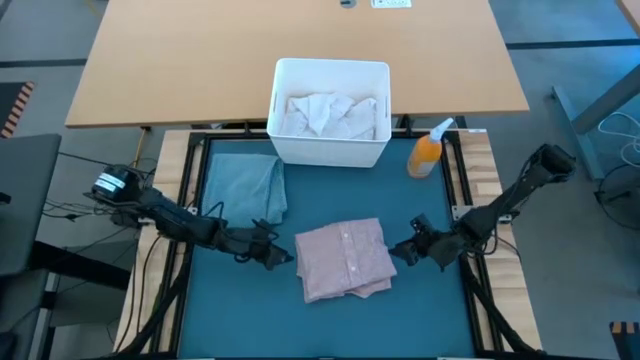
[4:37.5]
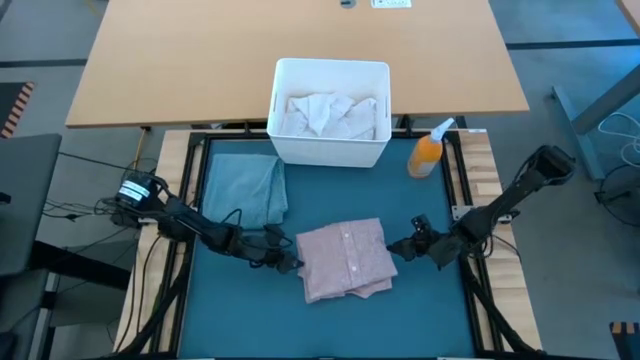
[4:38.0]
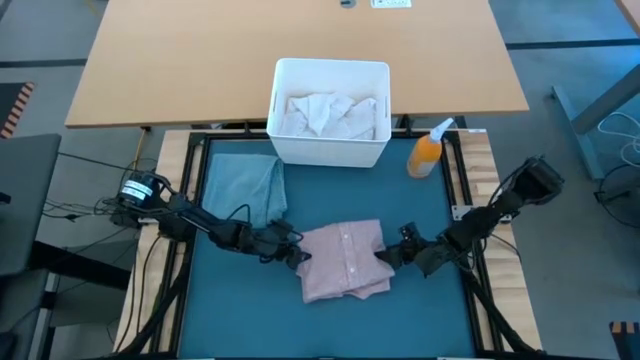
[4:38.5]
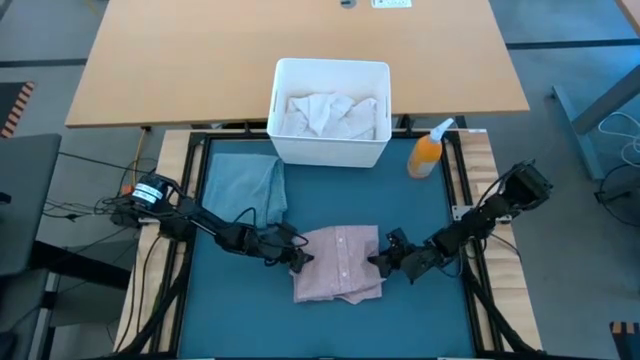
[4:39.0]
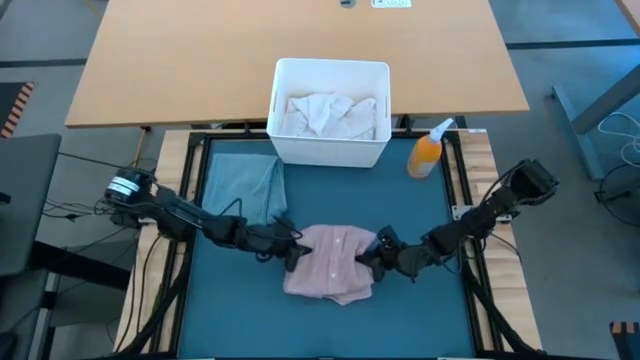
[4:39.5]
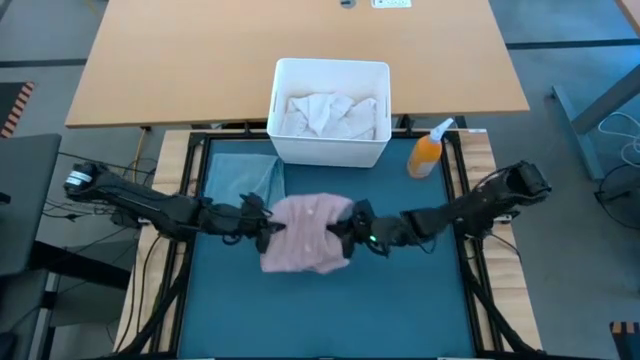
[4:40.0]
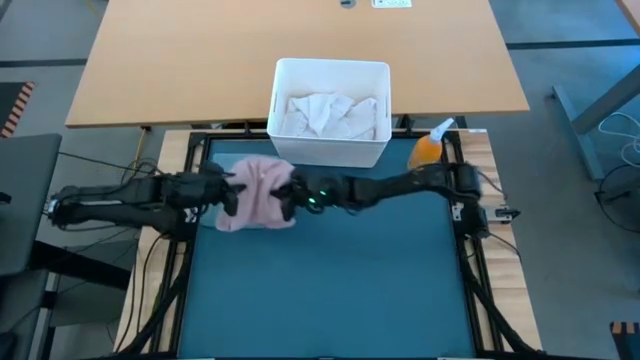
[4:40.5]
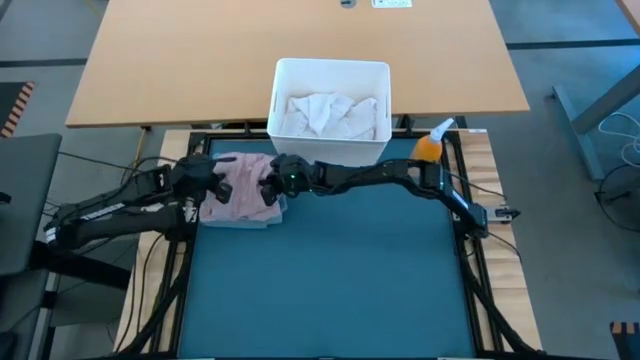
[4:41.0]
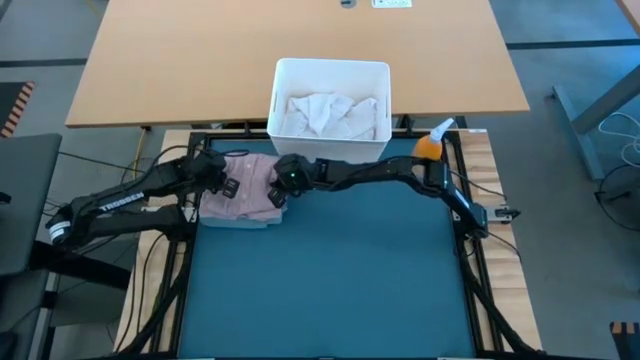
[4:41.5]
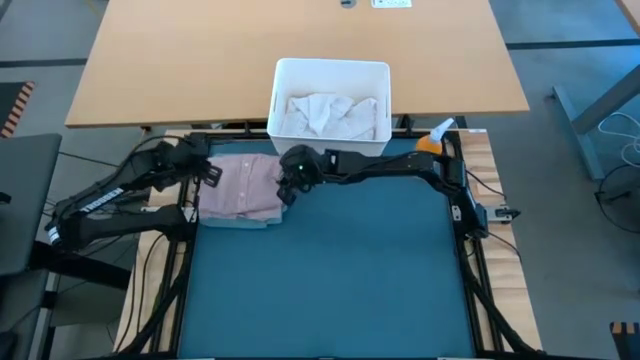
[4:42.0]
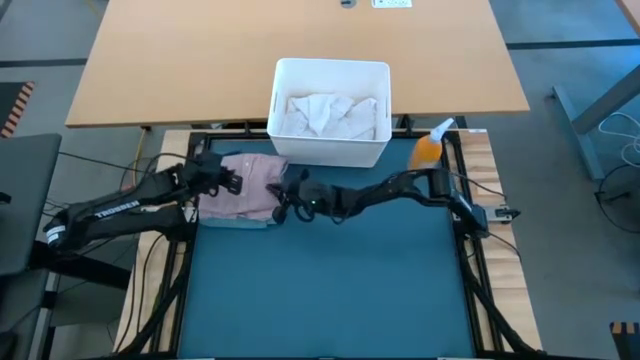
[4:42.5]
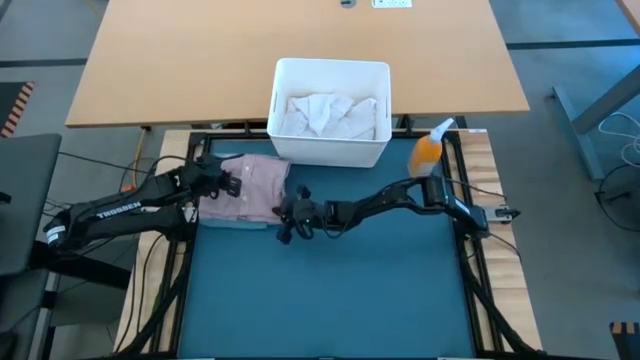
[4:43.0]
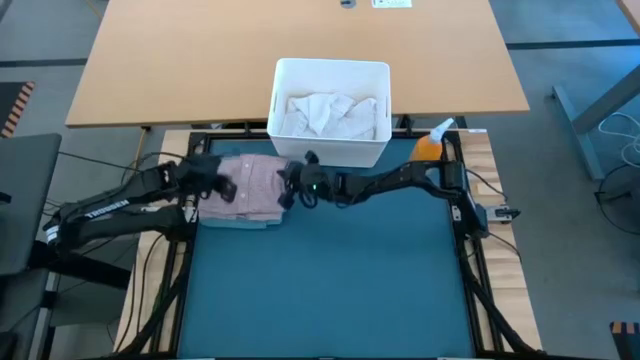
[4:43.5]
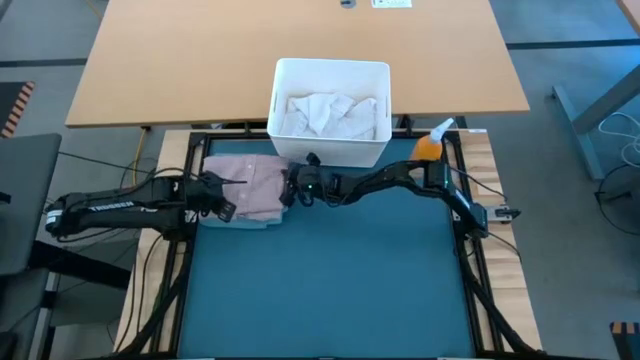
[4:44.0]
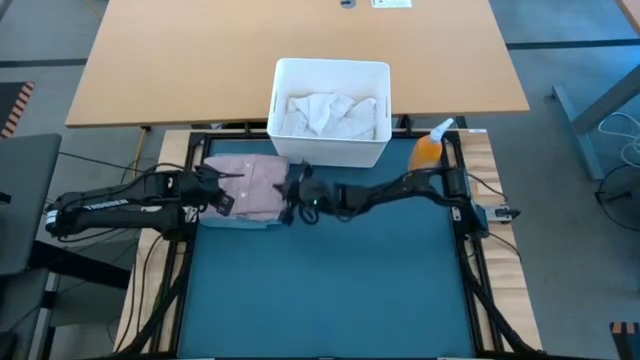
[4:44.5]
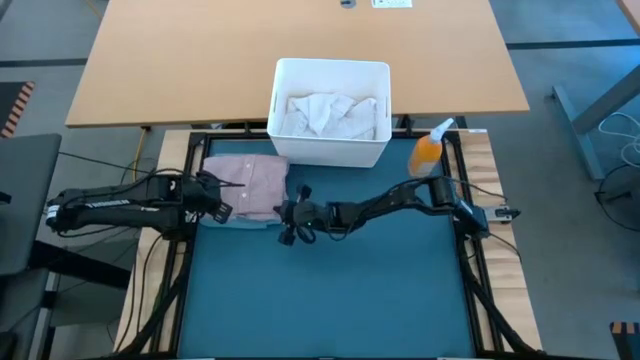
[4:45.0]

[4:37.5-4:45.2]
Task: Fold Laundry from Bin
Stack the pink shirt on top of the blue pants

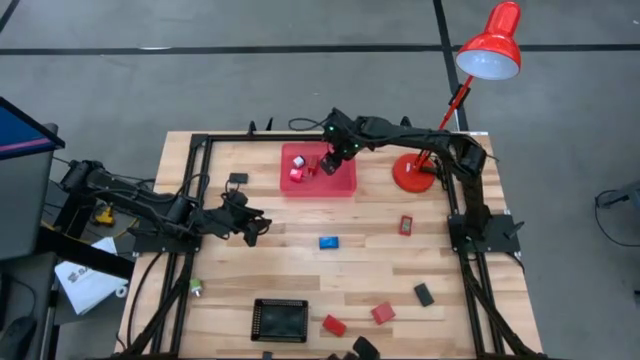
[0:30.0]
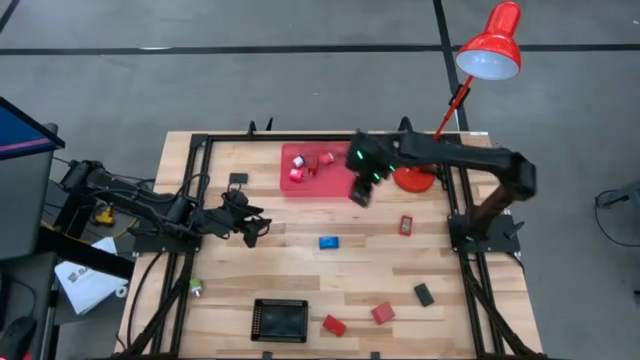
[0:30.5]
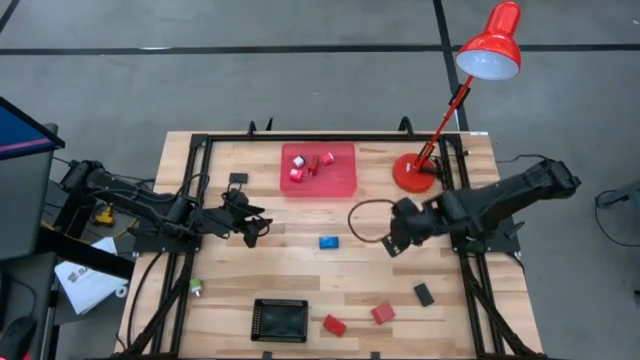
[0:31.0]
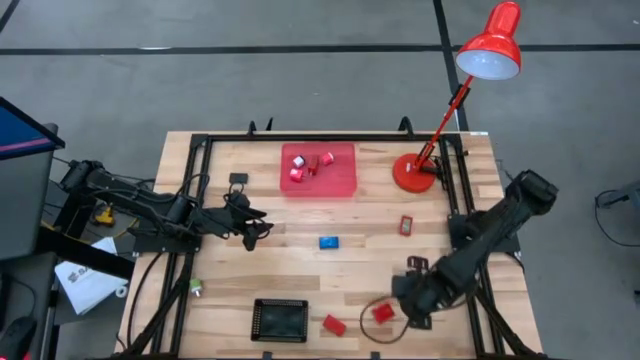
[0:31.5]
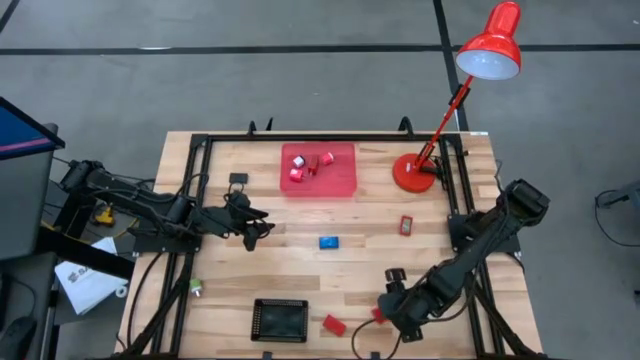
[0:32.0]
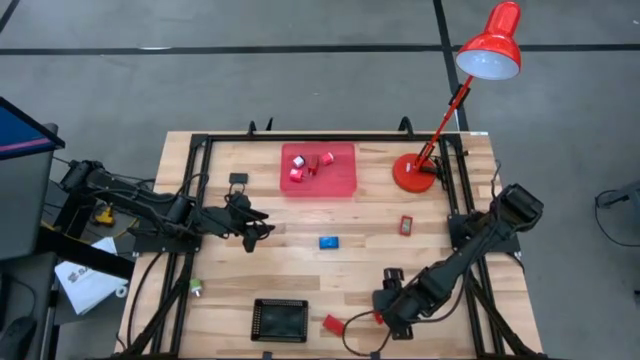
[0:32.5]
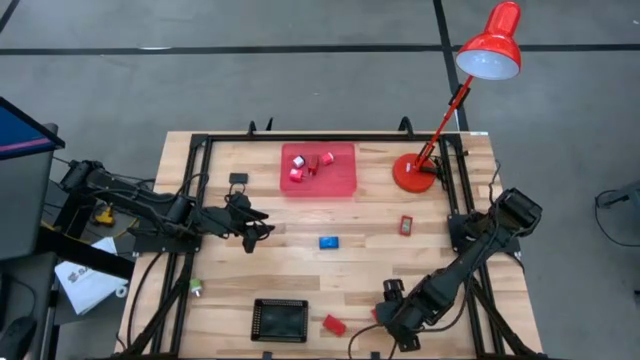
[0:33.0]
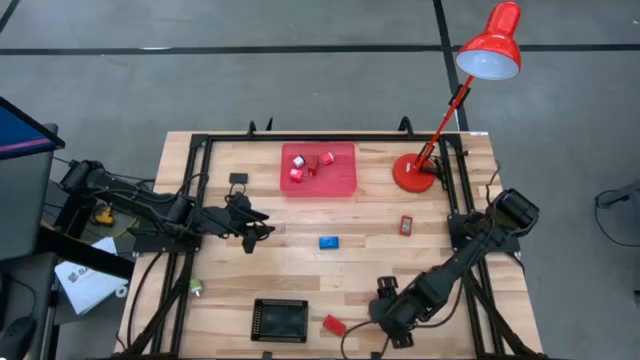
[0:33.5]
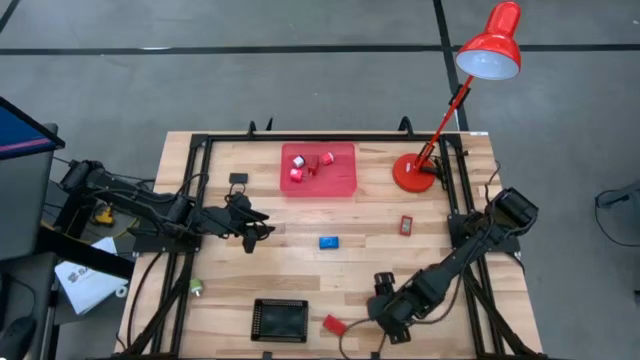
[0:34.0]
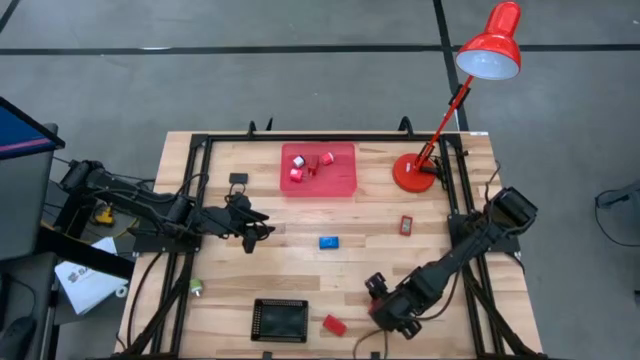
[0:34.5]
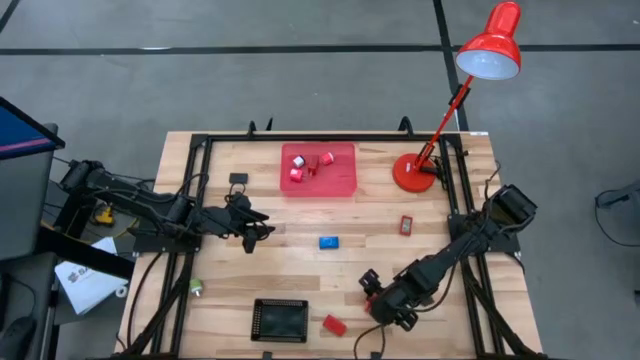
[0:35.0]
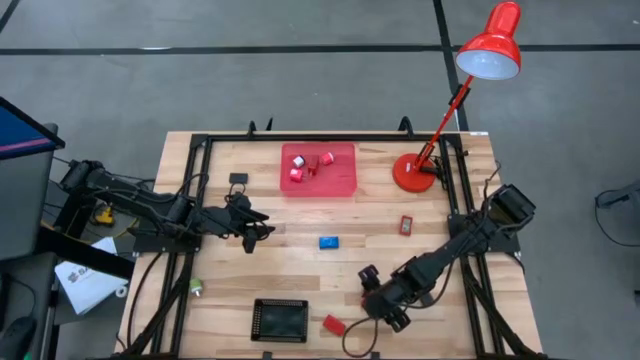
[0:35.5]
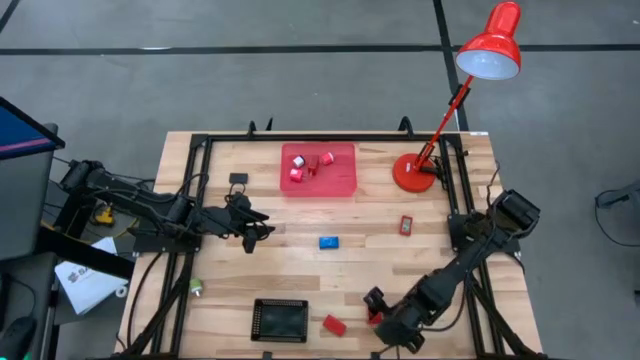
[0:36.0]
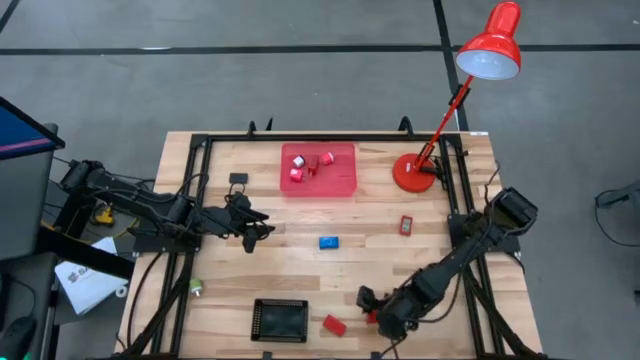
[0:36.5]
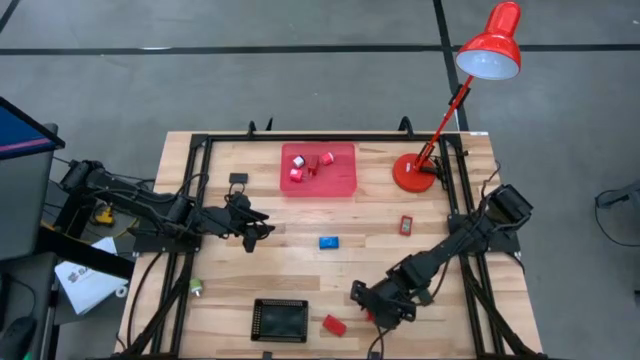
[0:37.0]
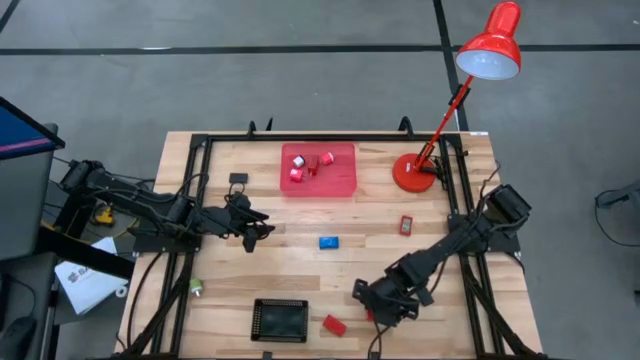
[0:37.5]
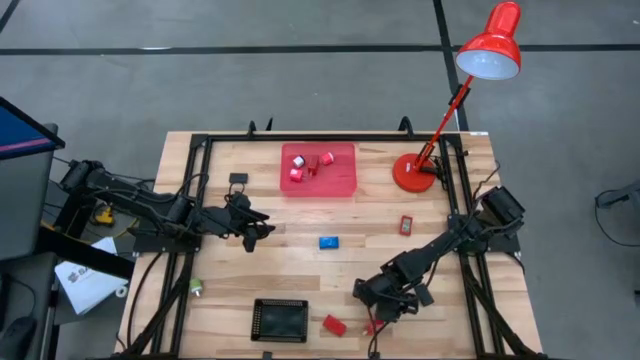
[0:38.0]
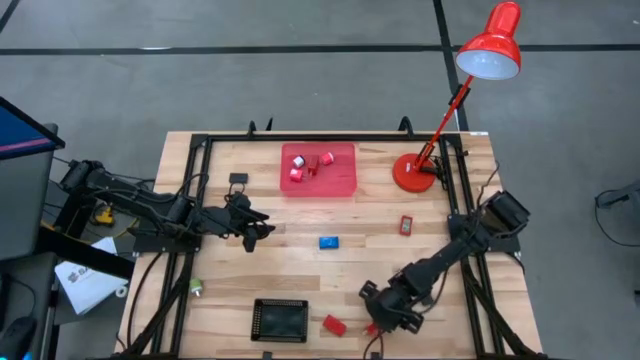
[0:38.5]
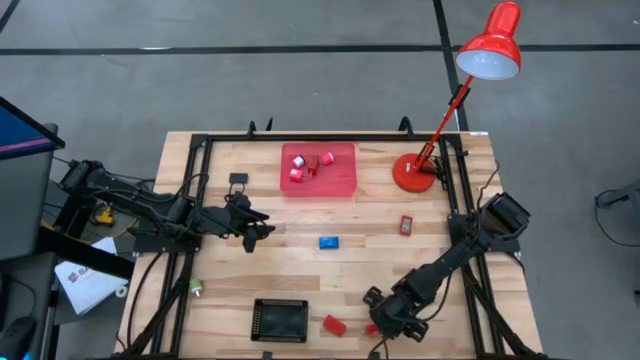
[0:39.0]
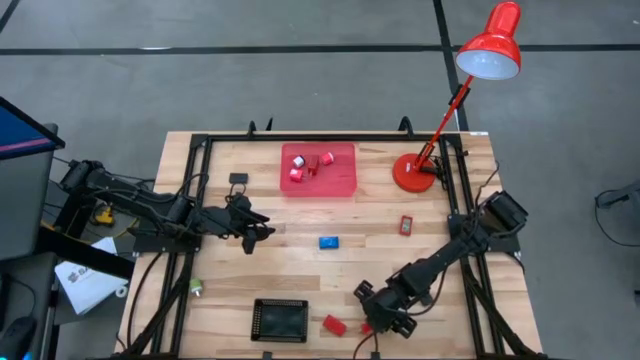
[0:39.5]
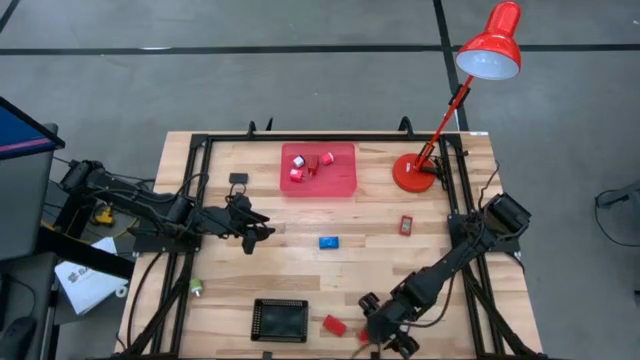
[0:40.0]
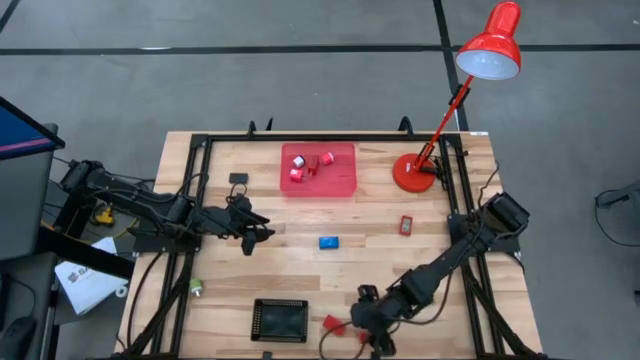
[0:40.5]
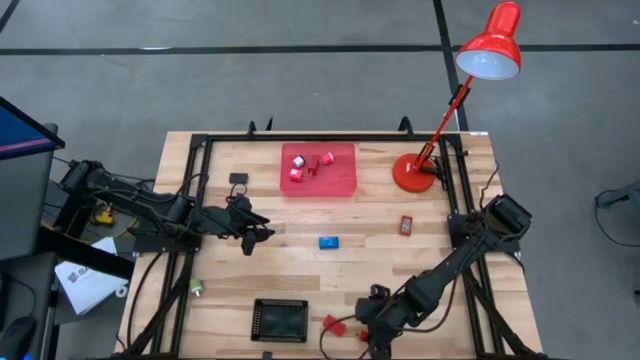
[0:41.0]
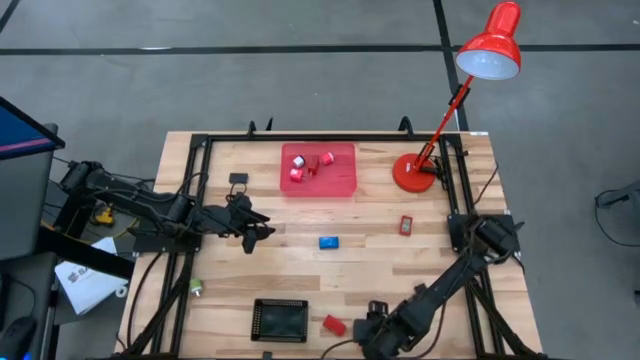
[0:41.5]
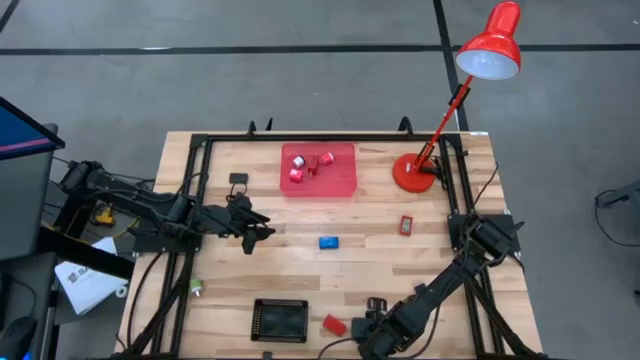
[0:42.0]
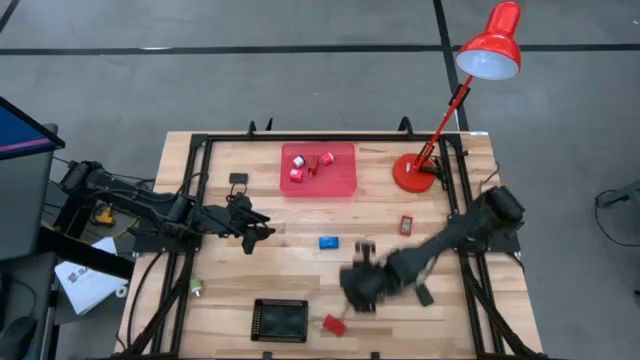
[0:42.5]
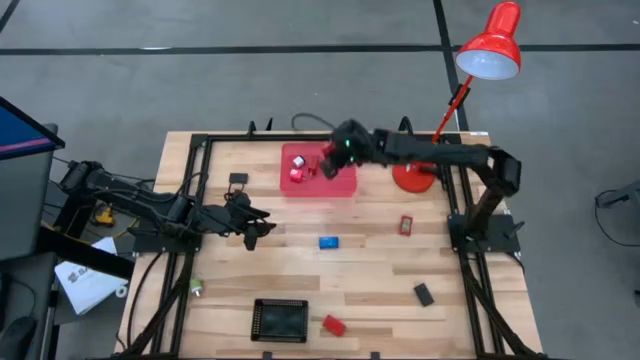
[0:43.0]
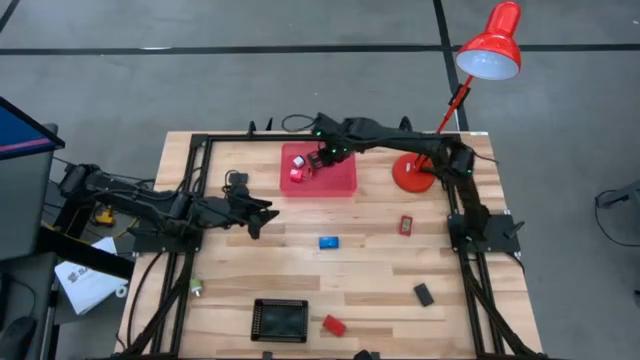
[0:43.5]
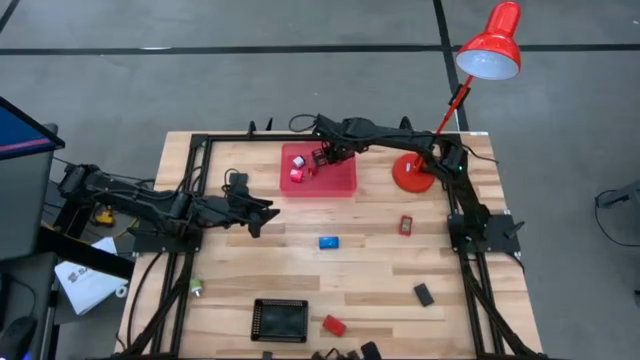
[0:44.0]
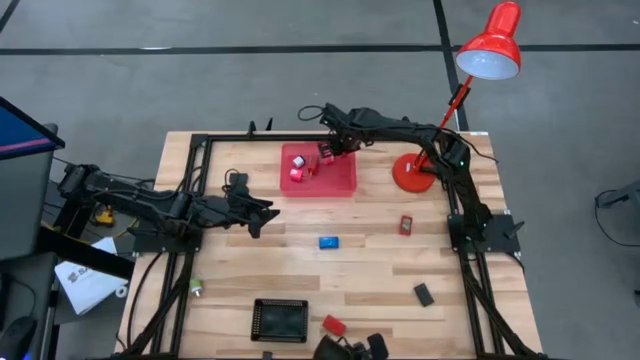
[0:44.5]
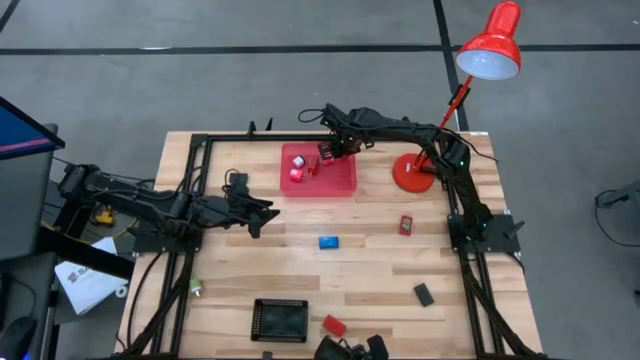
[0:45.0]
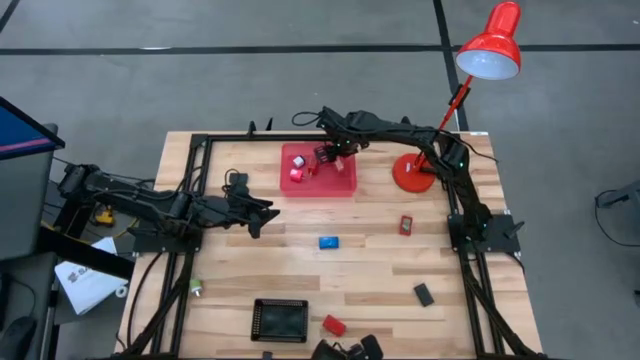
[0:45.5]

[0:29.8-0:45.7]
Task: Pick & Place Office items
Put the red charger adapter into the pink bin
